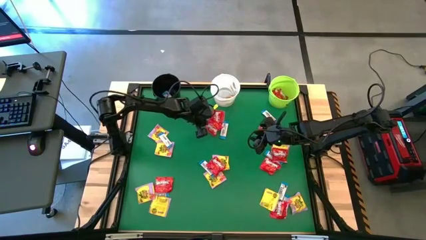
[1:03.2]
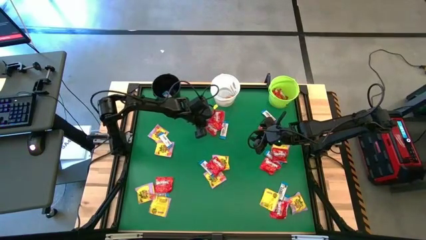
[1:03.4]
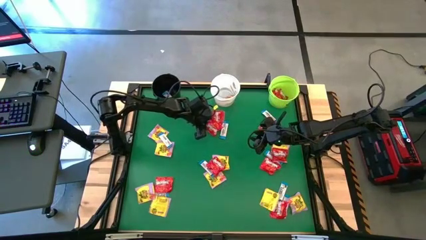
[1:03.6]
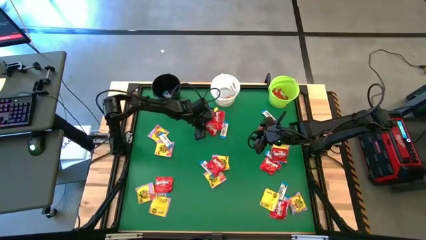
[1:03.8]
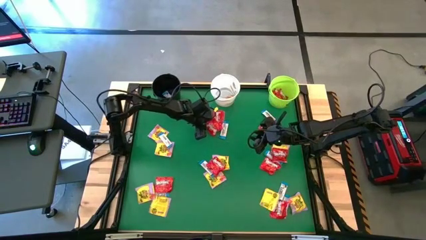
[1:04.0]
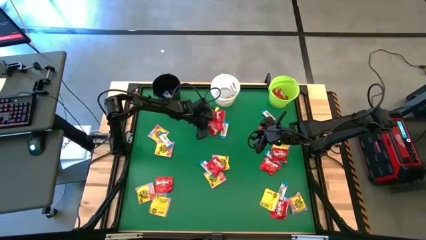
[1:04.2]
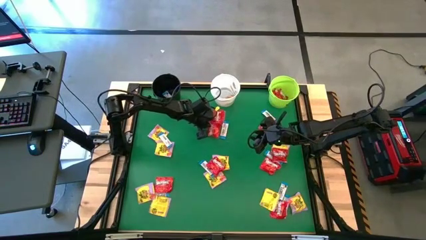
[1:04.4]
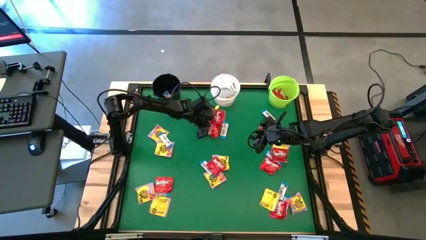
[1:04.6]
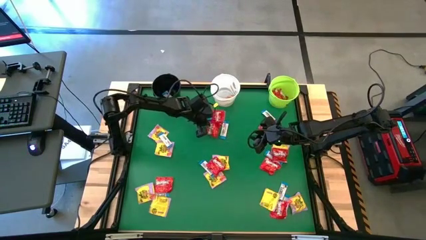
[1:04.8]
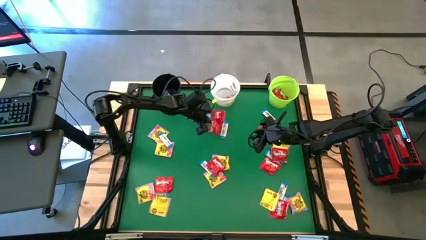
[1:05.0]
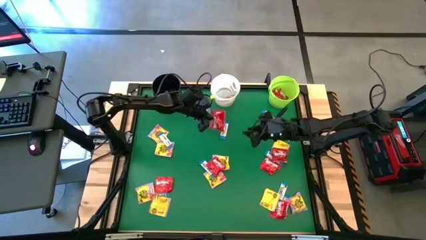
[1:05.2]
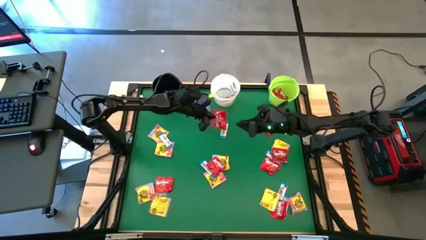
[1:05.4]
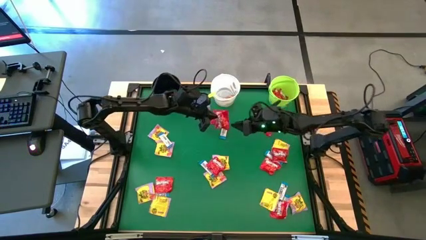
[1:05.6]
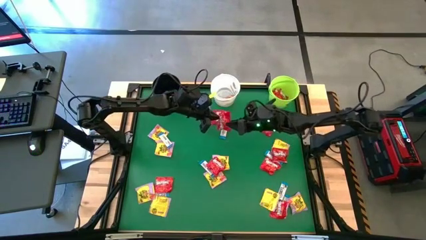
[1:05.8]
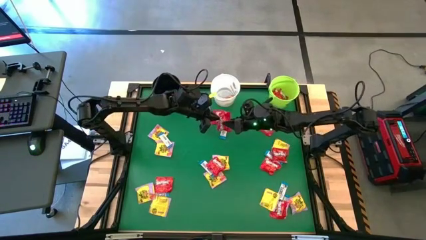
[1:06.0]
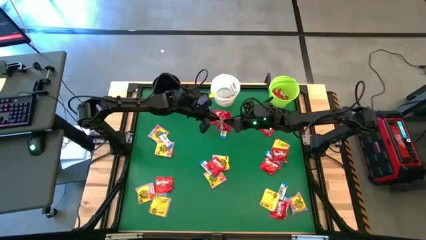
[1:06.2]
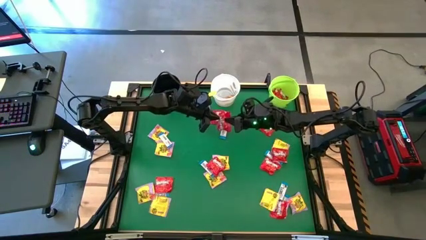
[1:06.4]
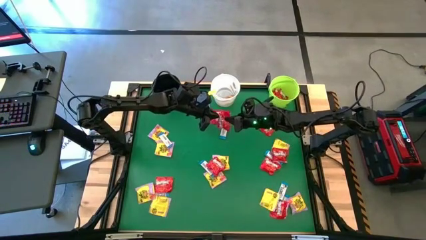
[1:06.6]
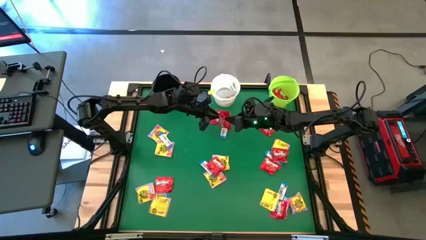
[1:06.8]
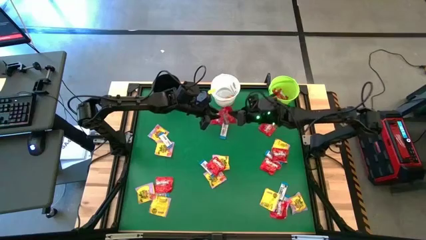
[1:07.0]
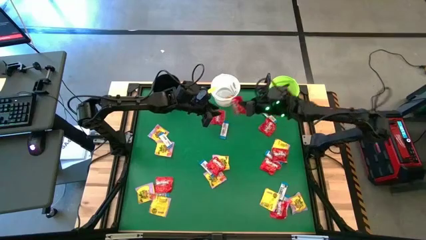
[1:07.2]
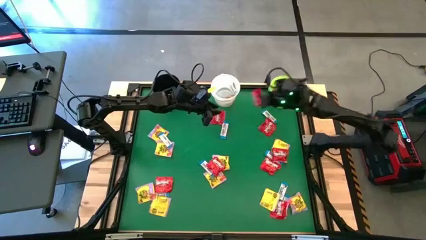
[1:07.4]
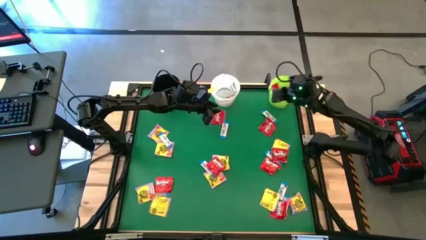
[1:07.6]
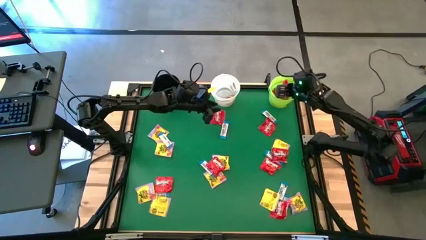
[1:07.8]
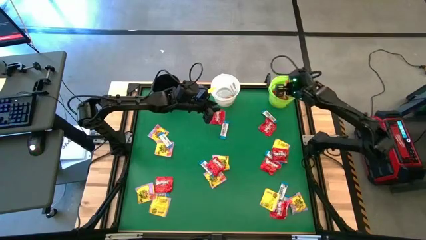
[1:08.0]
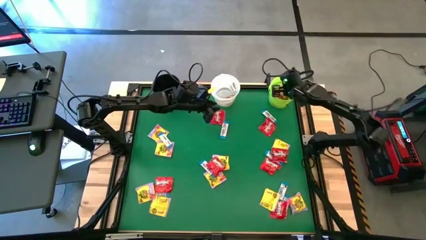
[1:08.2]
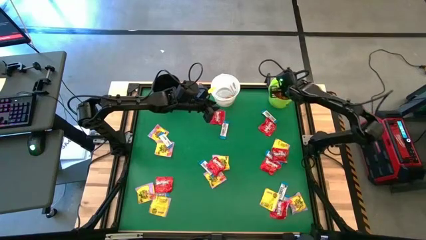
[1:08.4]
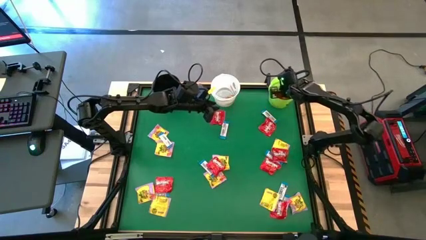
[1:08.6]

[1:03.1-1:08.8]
Task: Sort candy by brand, put in halloween buckets
Put the red candy into the green bucket

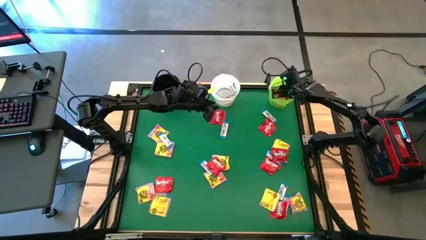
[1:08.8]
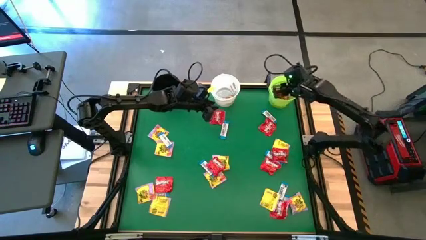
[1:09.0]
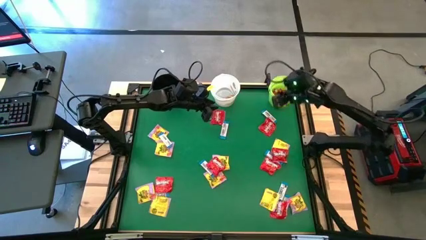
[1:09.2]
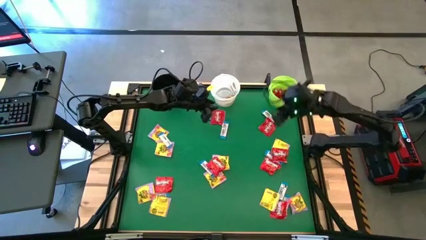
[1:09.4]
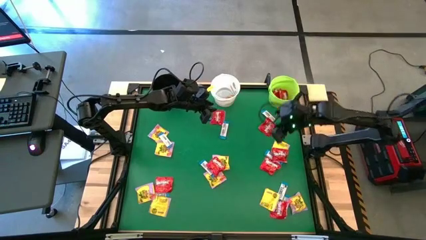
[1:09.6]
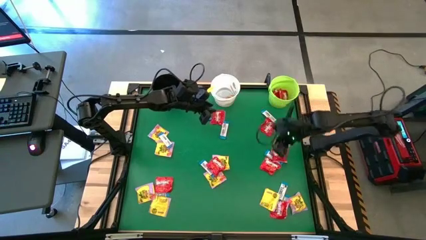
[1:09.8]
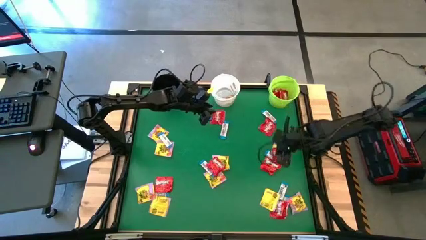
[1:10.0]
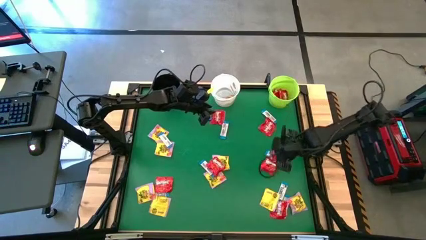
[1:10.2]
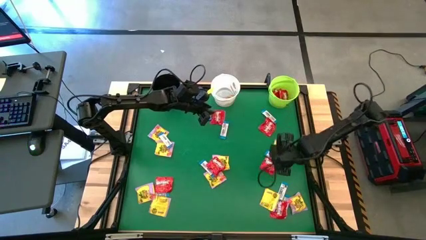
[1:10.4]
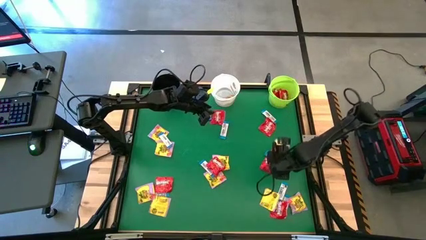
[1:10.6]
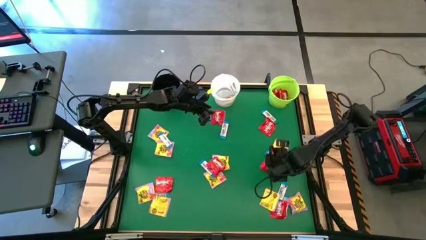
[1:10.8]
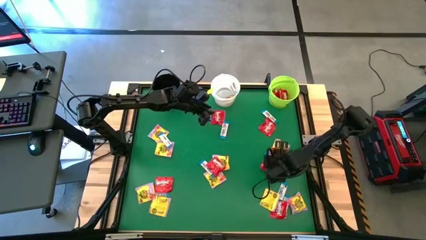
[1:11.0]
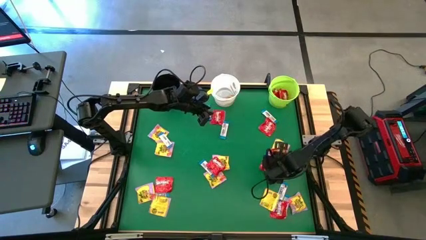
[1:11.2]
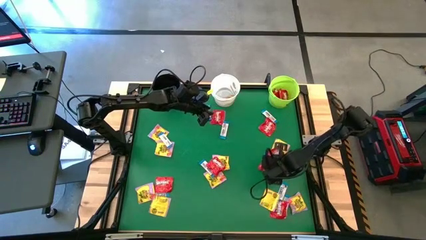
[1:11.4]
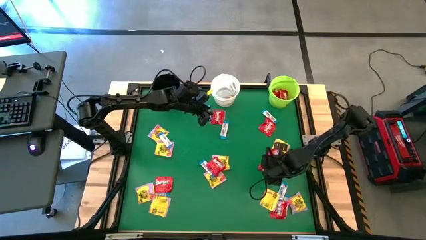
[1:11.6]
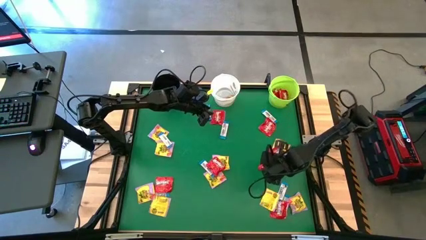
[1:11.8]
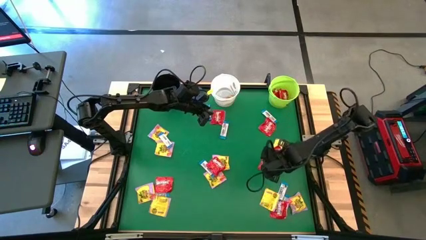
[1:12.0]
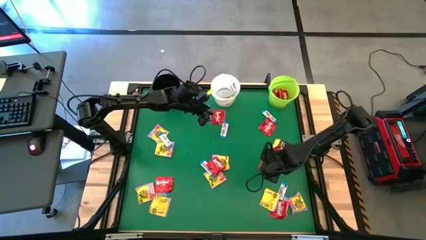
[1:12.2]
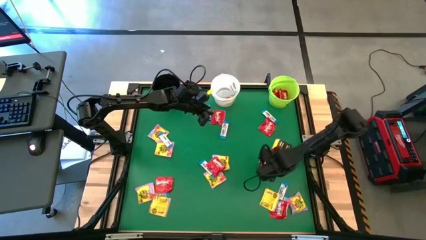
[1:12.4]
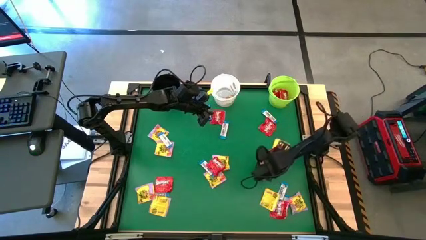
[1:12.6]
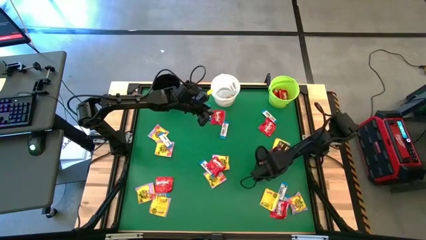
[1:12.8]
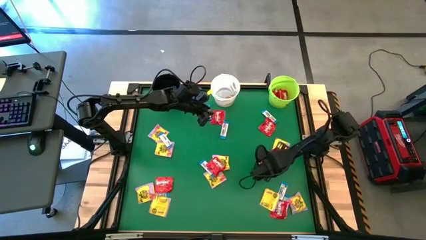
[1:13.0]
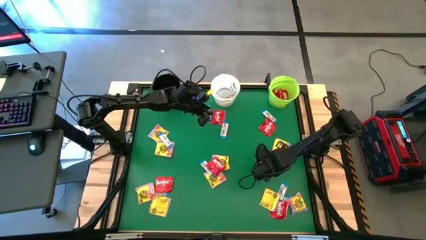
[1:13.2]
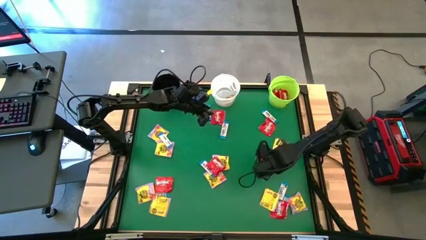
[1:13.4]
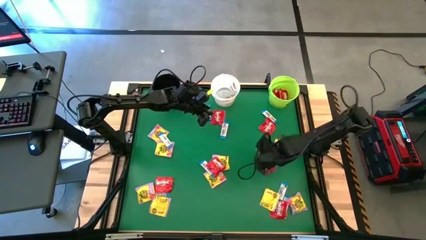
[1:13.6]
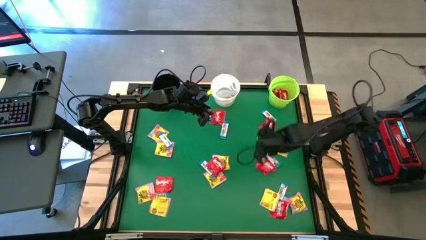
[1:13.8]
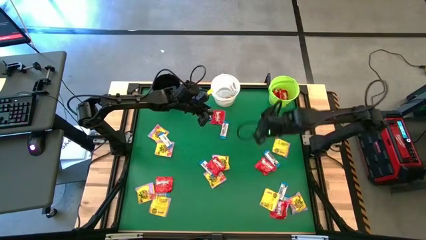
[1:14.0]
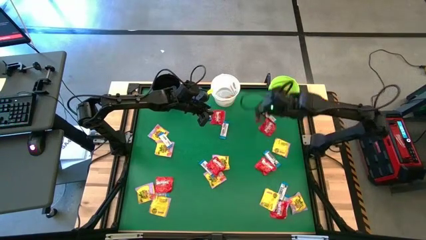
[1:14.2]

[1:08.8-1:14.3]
Put the red candy into the green bucket

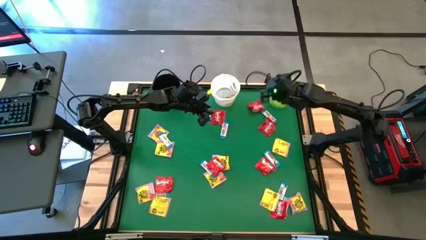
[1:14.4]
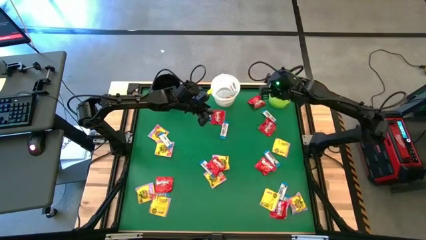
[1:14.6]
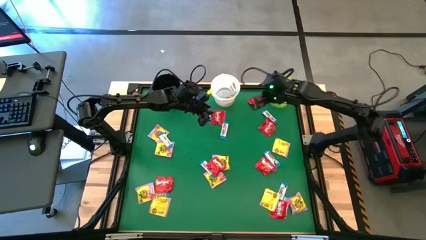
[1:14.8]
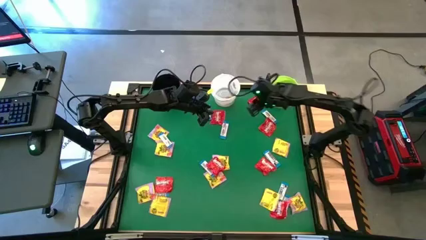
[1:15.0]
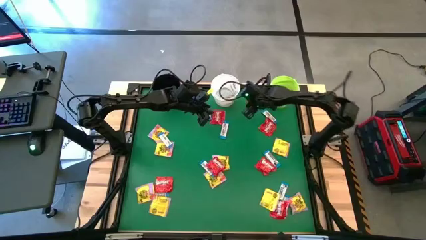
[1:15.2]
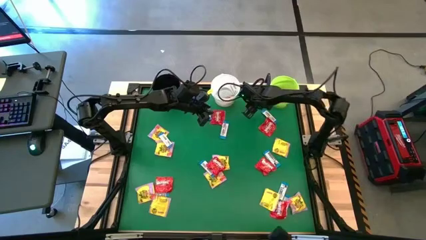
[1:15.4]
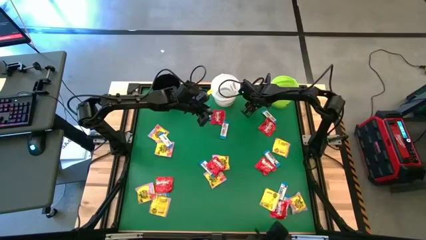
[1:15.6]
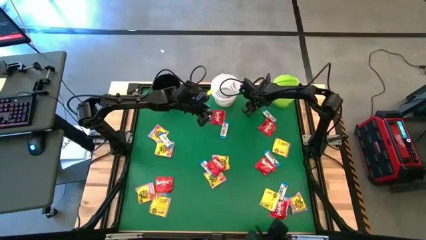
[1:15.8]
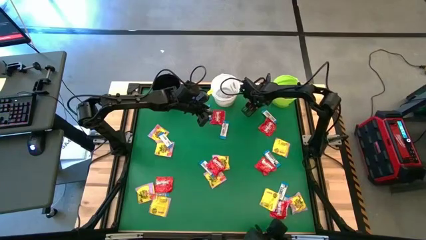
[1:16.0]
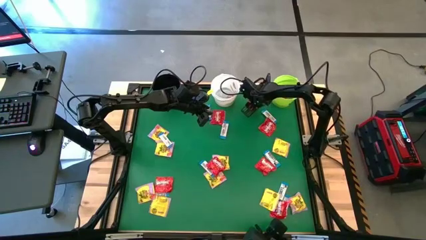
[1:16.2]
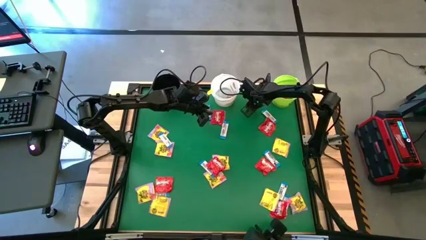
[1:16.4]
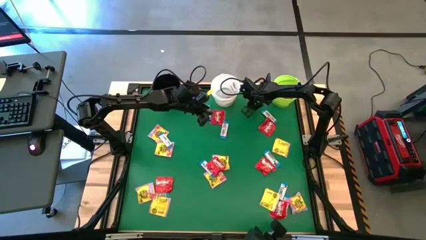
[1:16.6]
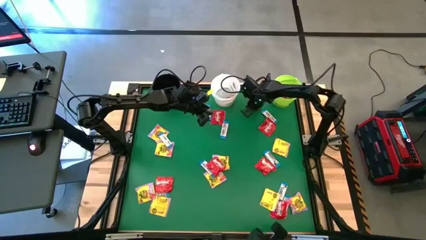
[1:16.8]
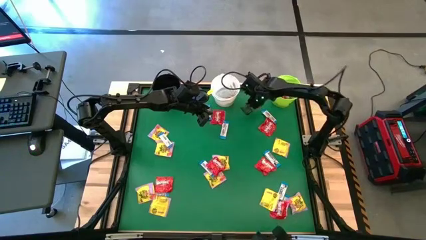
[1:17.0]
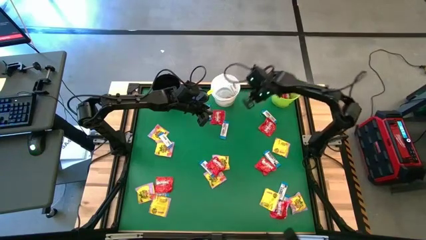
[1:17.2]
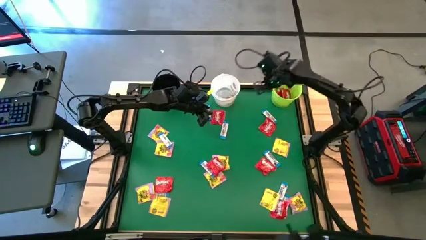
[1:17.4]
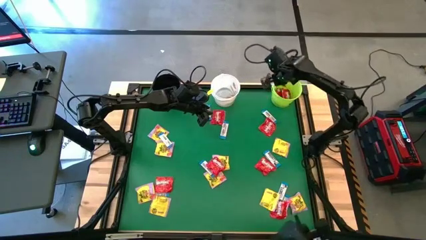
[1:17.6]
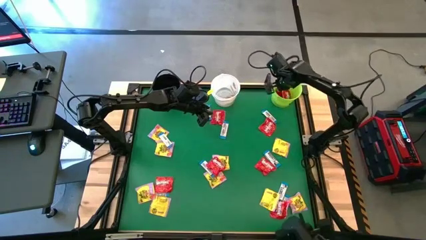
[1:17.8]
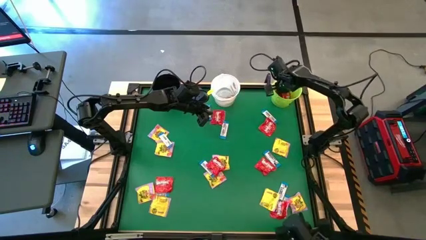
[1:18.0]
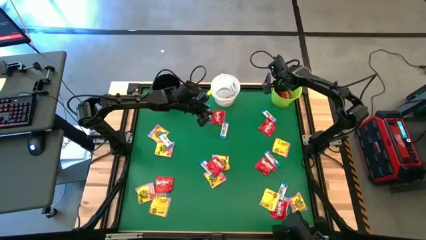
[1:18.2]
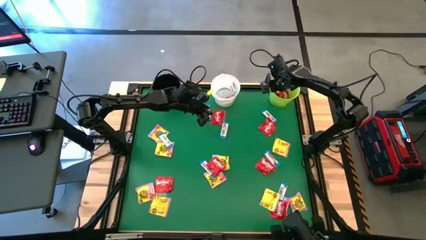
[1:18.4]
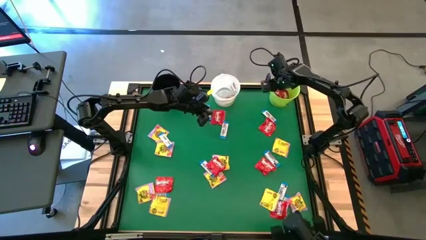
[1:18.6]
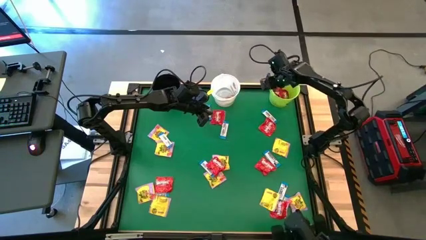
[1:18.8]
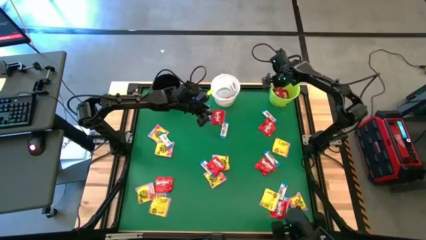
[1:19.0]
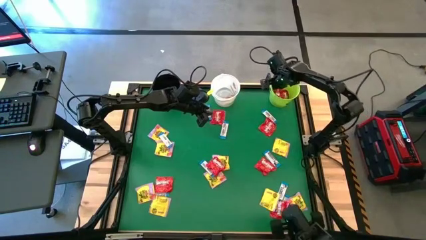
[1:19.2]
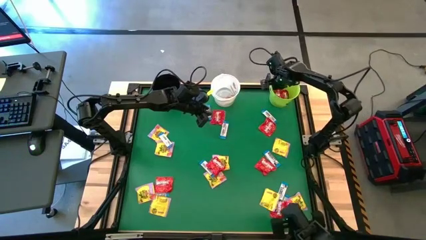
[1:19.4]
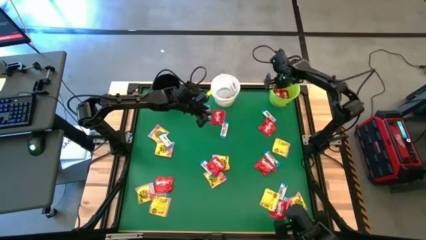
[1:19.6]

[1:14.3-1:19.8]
Put the red candy into the green bucket
